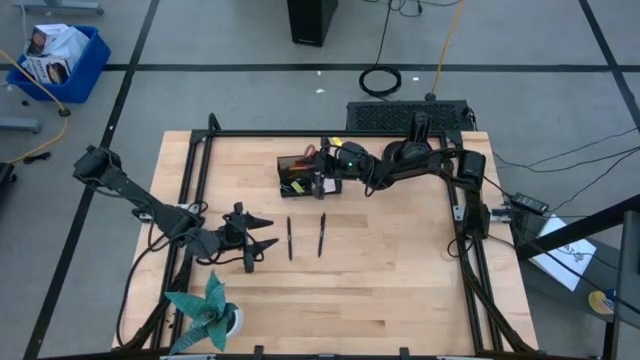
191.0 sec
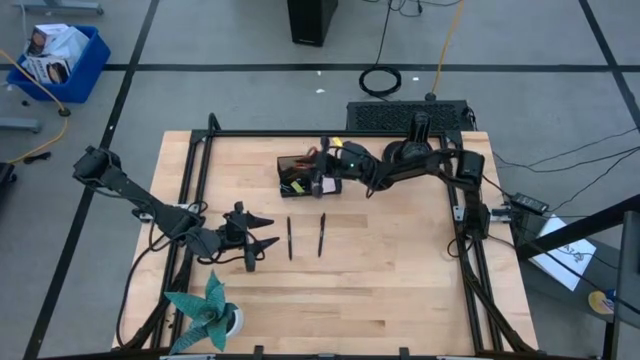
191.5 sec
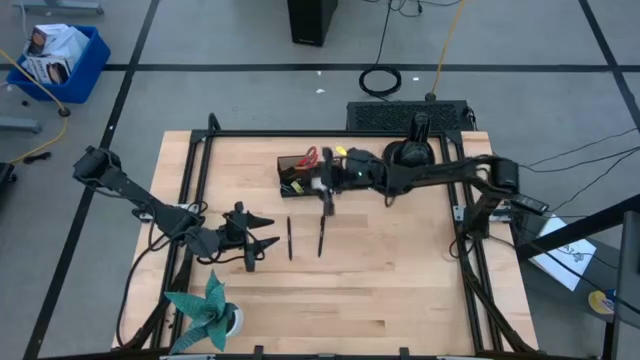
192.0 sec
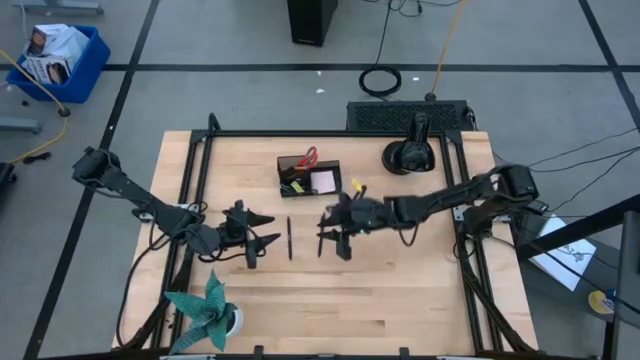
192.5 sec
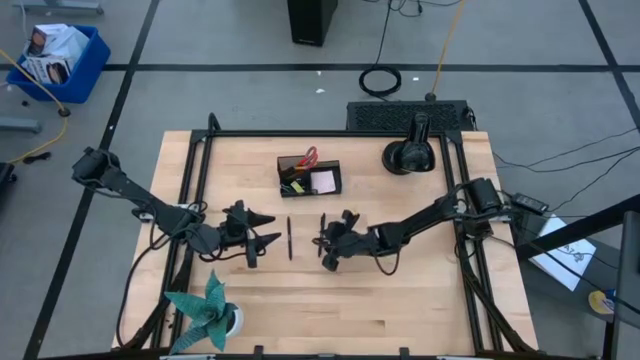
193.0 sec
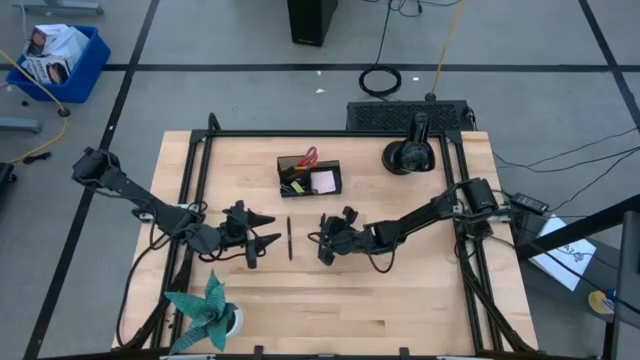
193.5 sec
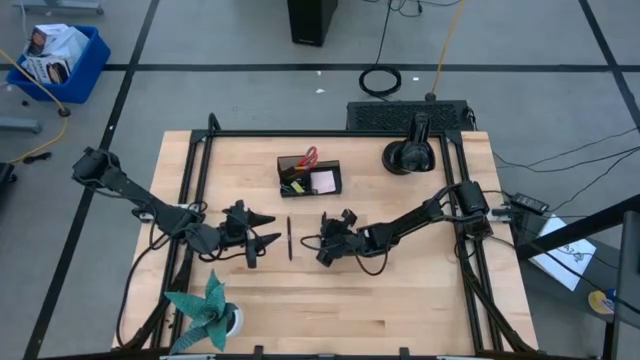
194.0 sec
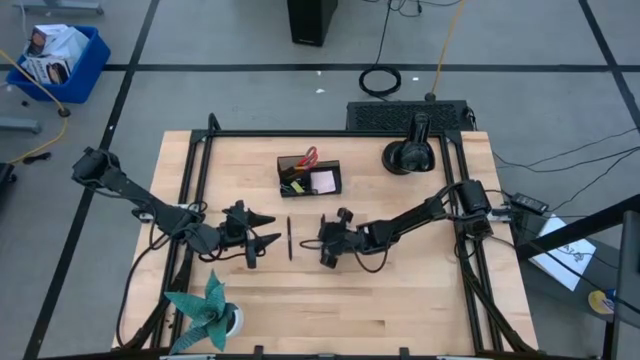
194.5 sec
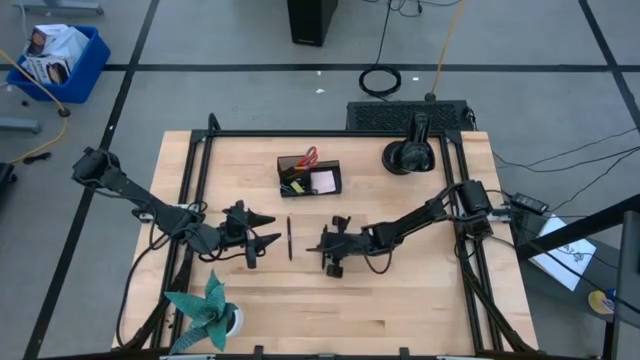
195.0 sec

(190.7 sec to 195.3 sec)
Task: Pick and place office supplies into organizer
Put the black pen into the black desk organizer

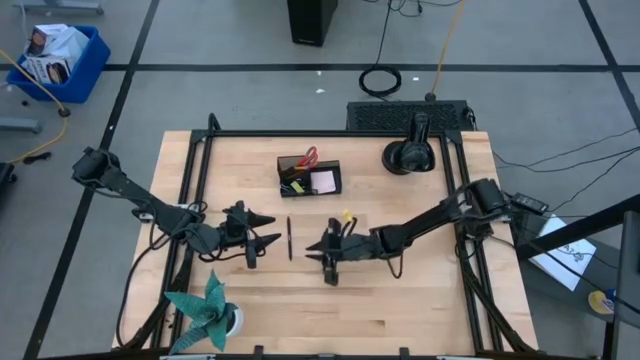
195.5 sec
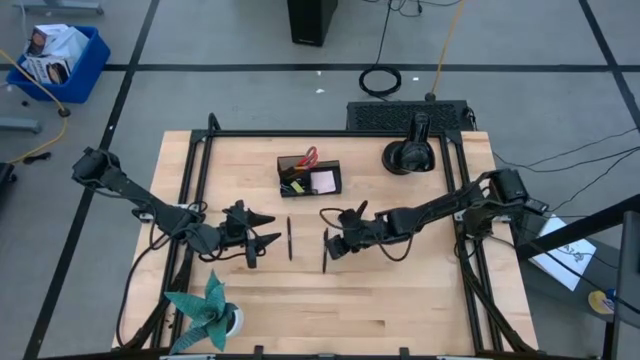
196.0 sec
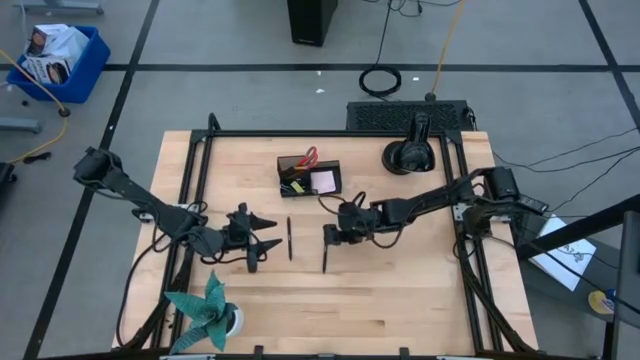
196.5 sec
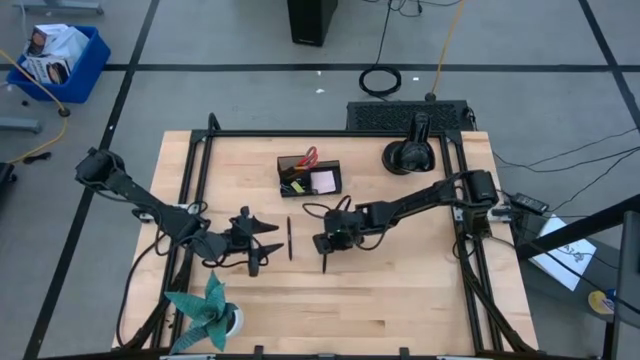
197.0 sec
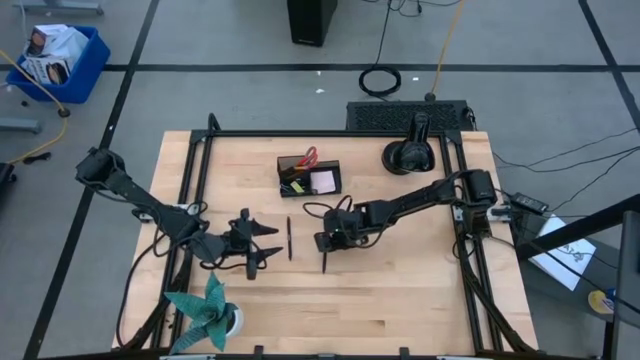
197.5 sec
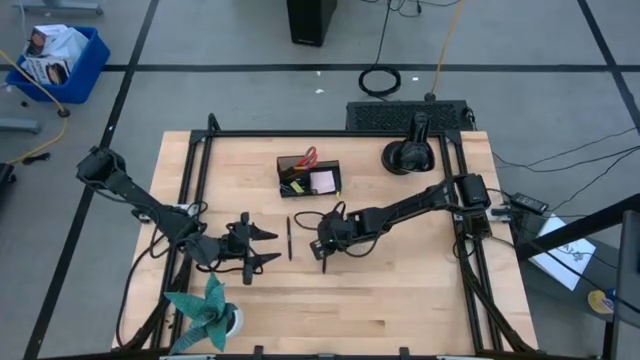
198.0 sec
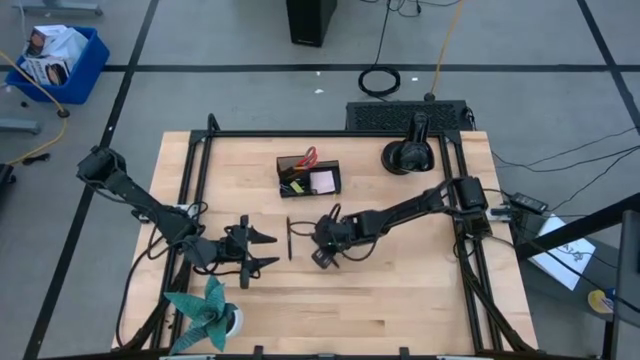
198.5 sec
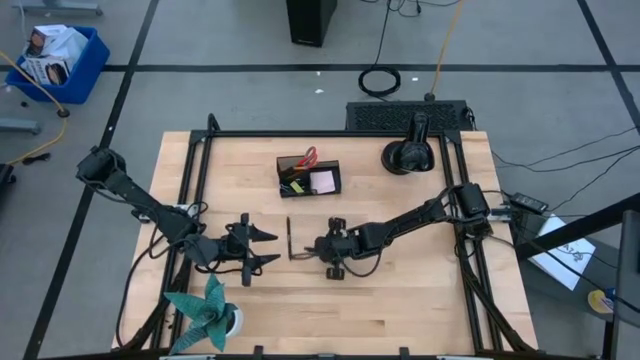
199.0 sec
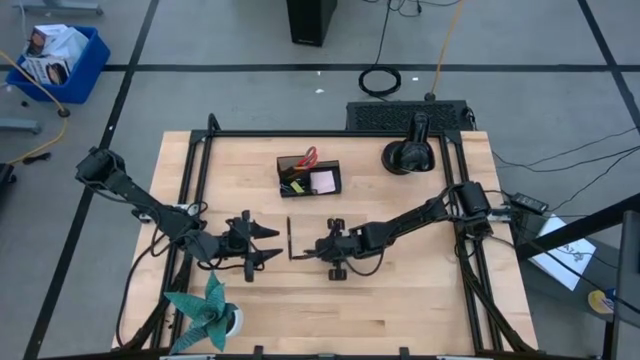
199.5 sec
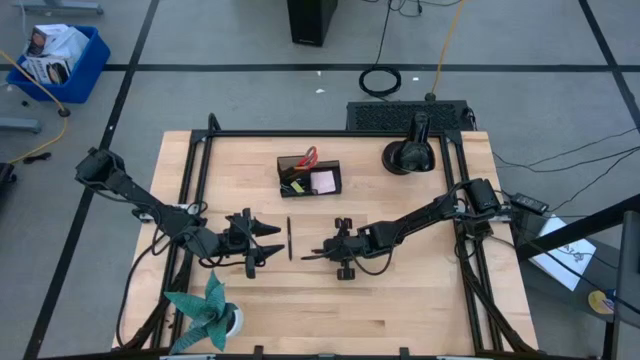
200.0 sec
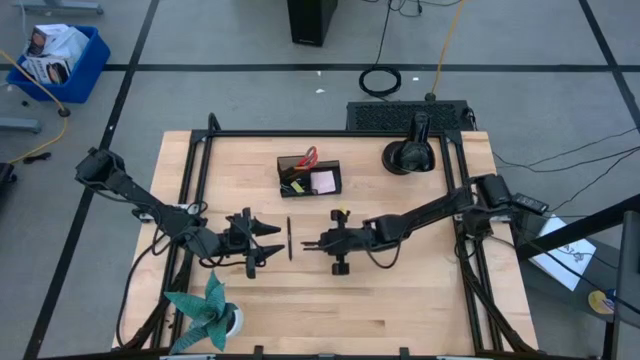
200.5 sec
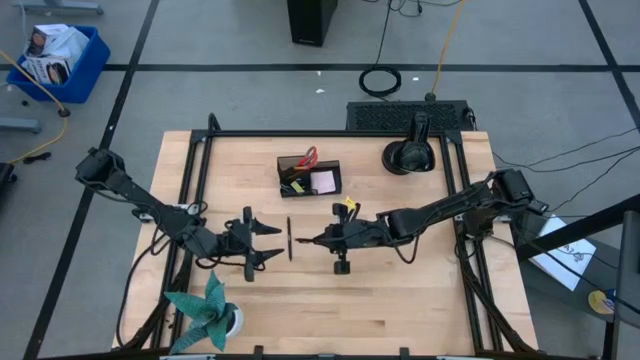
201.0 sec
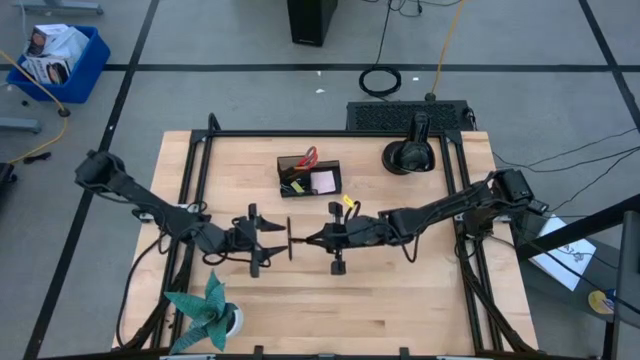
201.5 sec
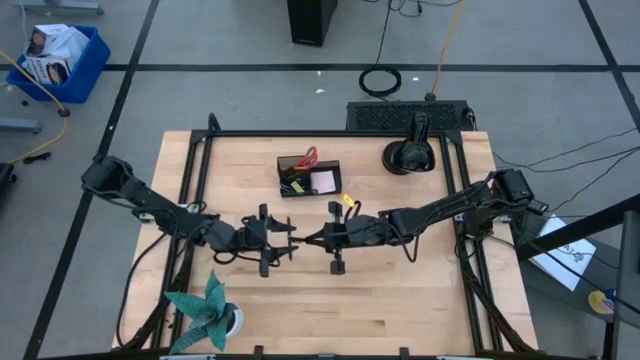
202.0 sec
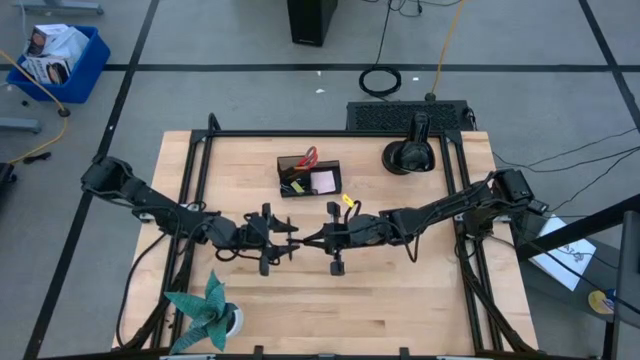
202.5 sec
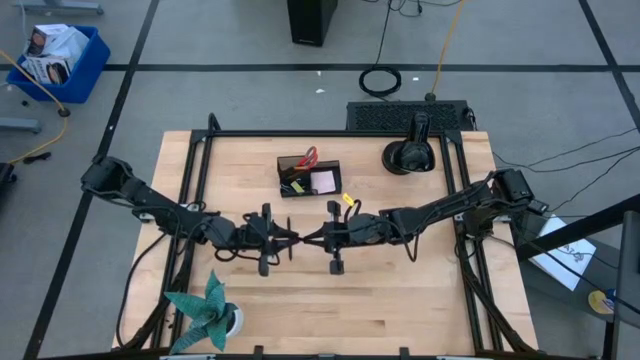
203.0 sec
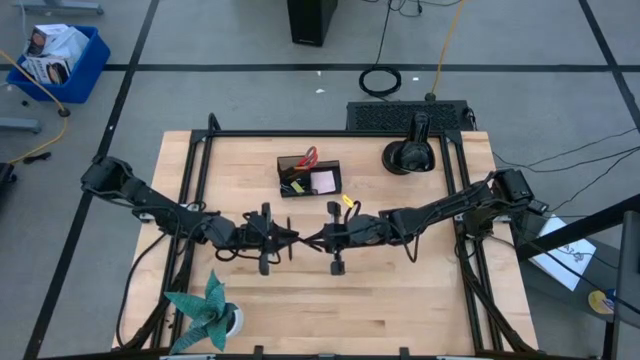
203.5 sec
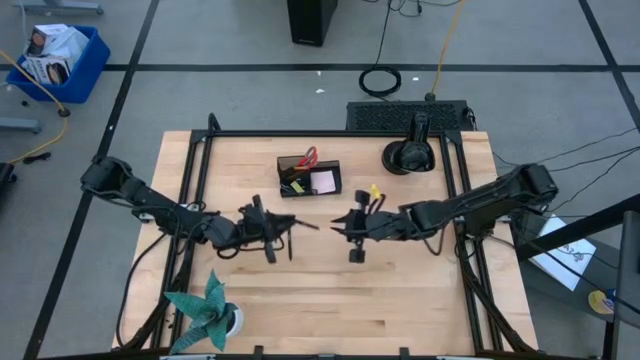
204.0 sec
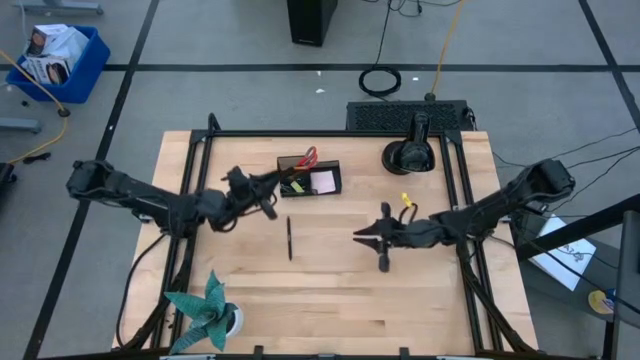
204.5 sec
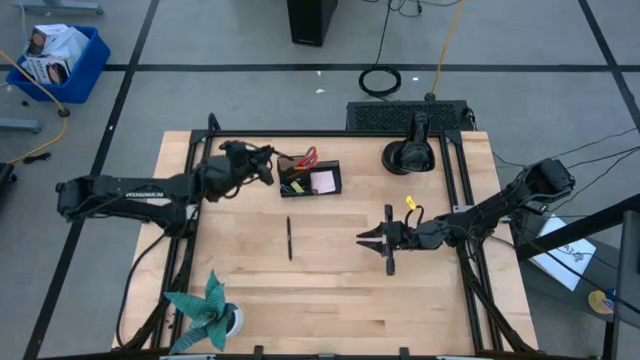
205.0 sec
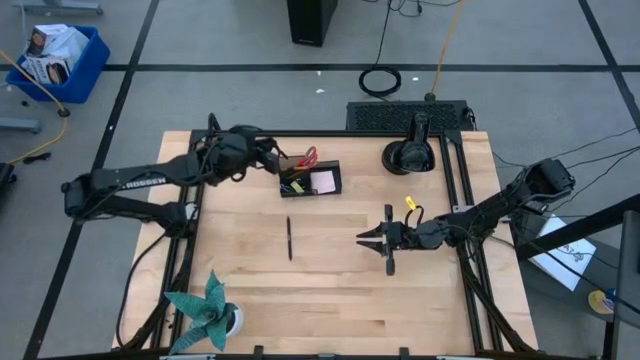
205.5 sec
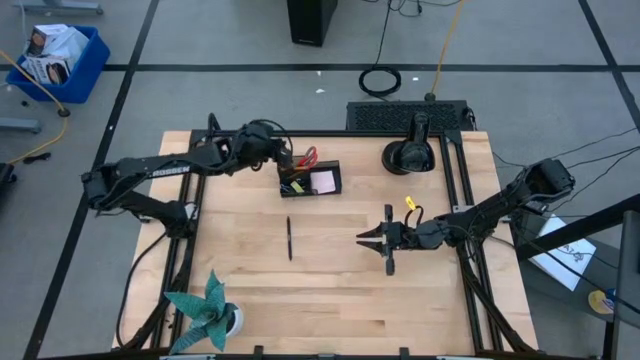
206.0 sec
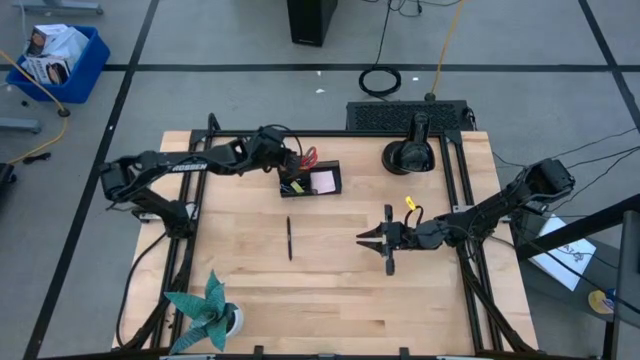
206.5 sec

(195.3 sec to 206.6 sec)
Put the black pen into the black desk organizer
